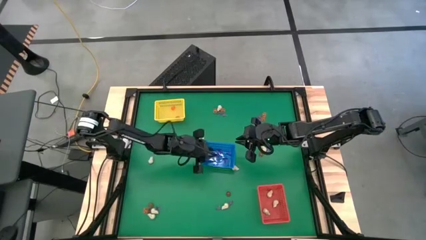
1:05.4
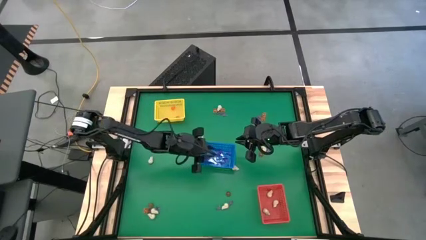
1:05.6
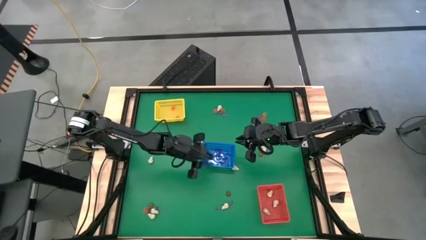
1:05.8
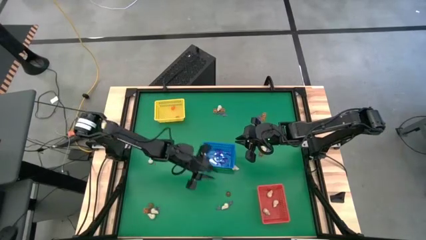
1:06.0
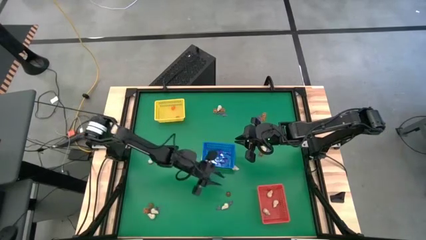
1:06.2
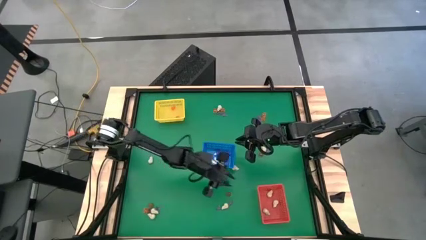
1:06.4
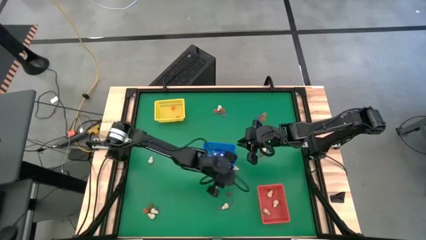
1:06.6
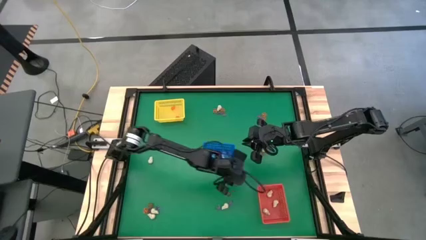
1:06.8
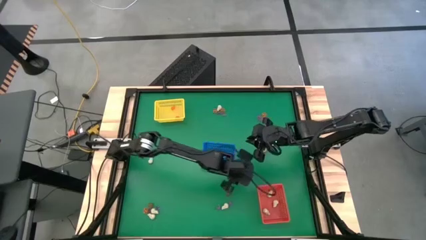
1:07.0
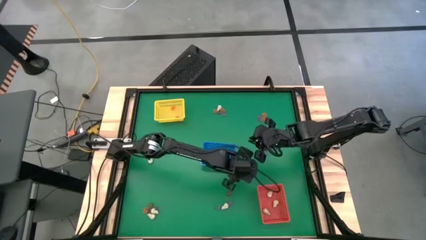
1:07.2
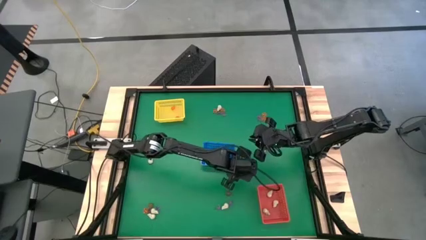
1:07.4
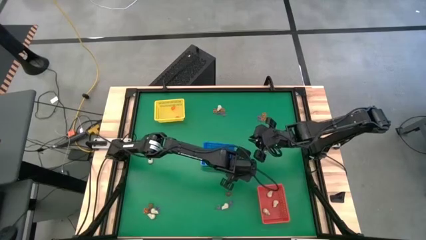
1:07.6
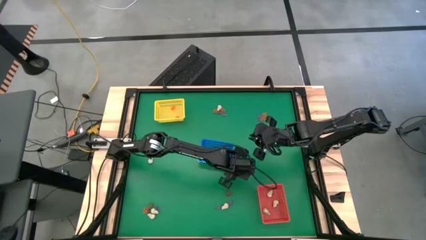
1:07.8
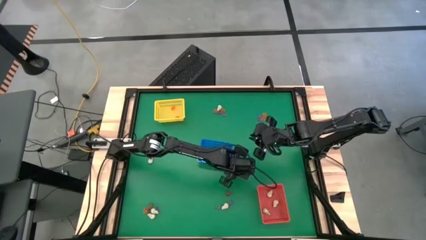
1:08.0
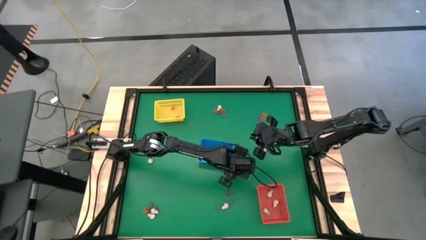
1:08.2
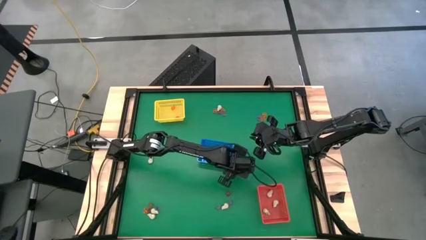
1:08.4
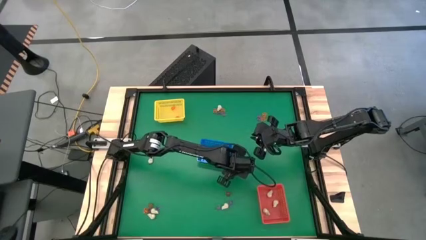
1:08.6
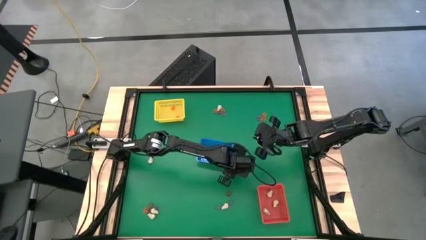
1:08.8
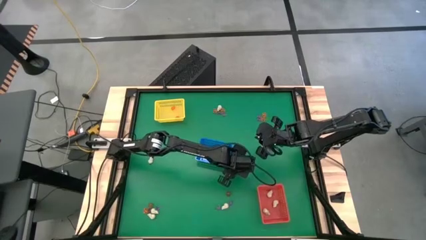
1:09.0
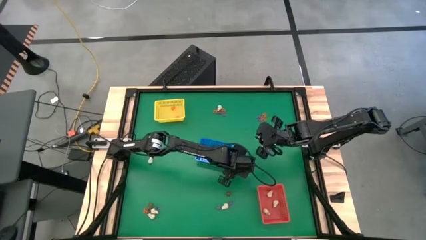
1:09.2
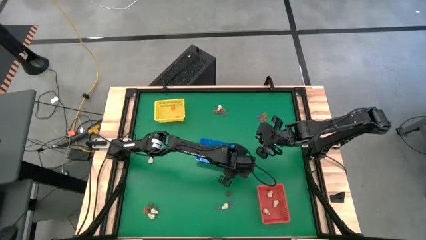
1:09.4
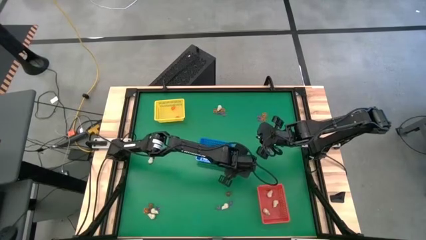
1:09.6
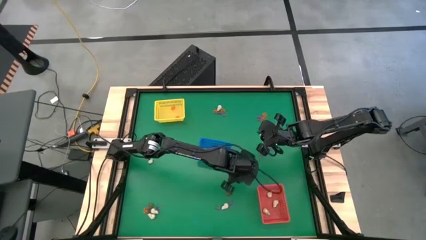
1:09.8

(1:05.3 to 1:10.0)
Task: Sort Halloween decoration
Put the skull toy into the red bin

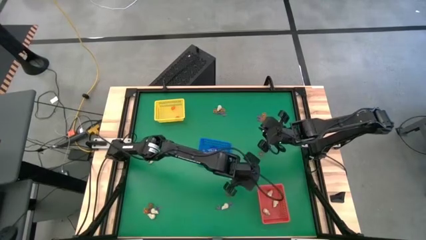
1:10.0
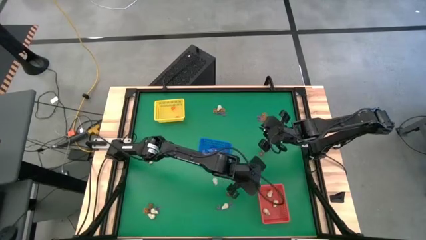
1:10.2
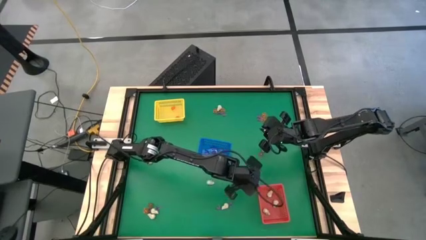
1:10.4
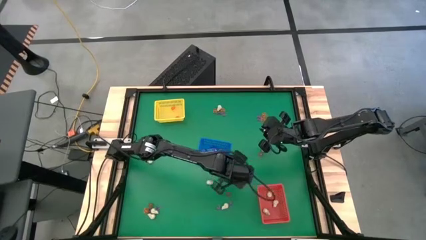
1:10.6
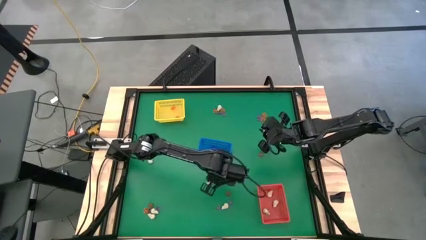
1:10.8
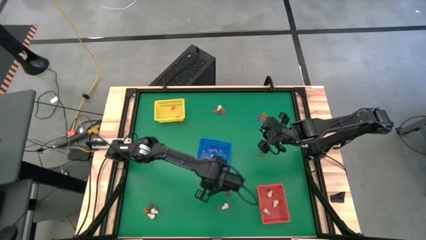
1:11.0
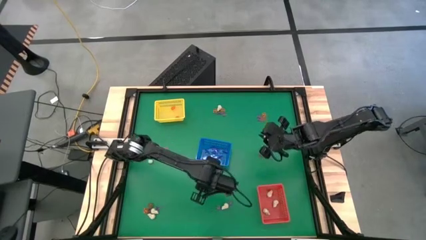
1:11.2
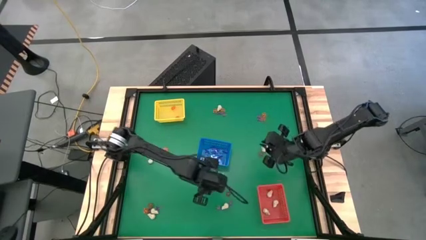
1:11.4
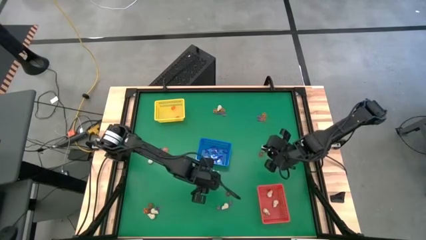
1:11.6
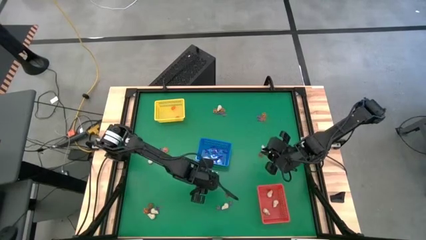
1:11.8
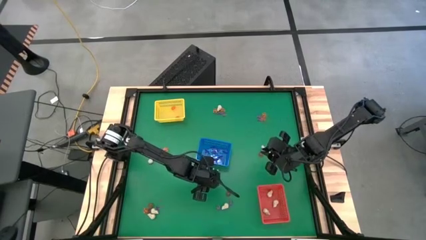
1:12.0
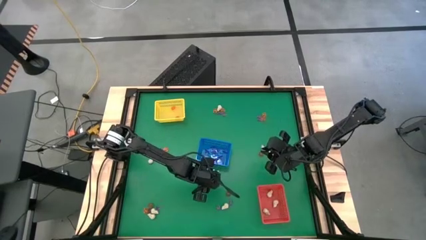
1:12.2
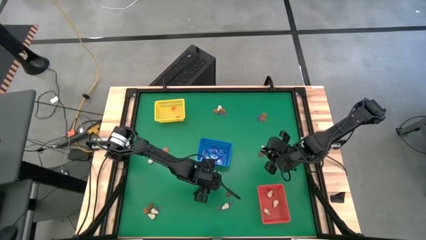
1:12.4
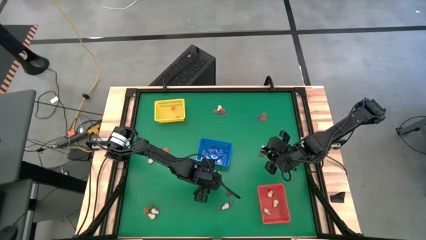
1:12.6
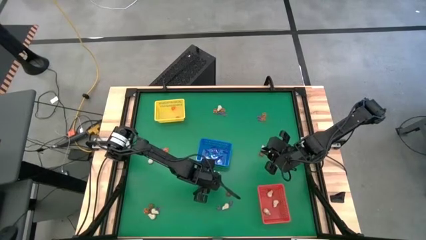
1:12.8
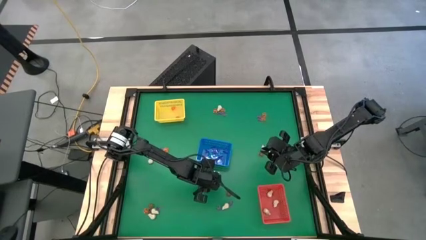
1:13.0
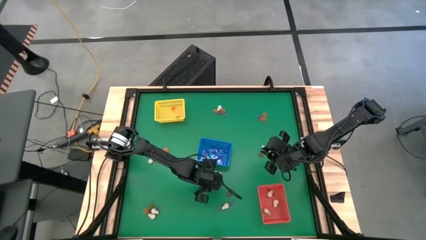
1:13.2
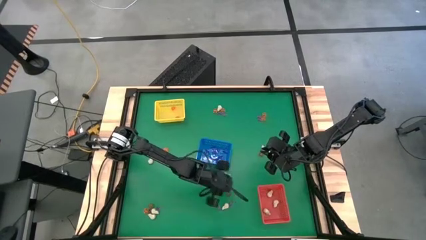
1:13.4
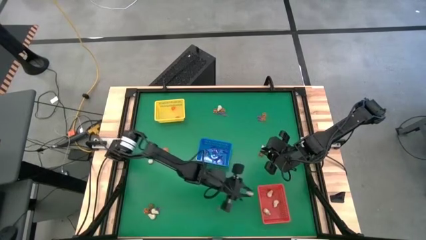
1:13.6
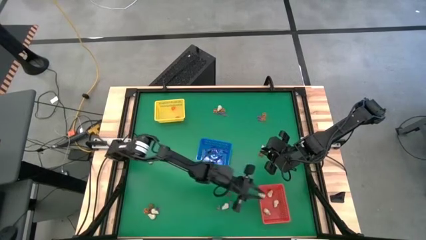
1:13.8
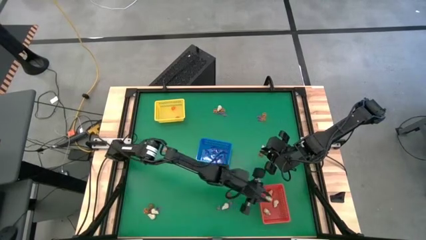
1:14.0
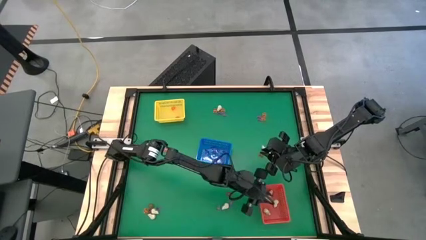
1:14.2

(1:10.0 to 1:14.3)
Put the skull toy into the red bin

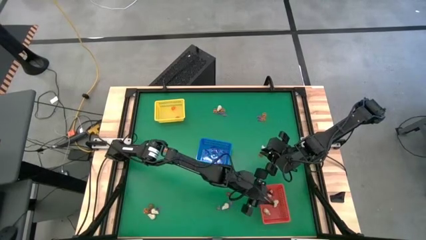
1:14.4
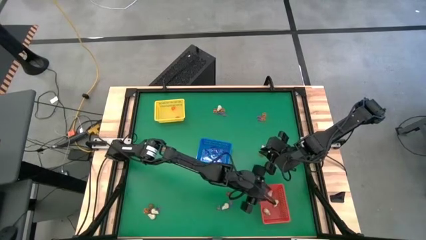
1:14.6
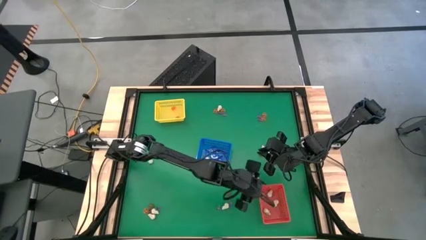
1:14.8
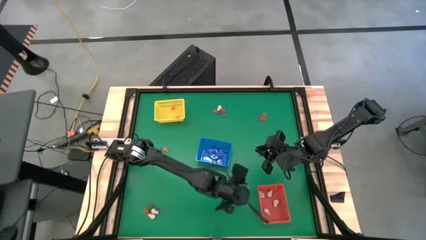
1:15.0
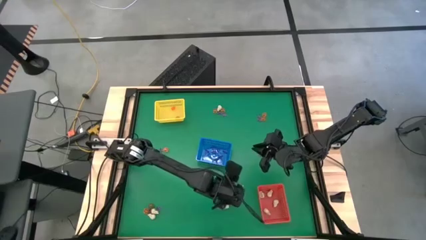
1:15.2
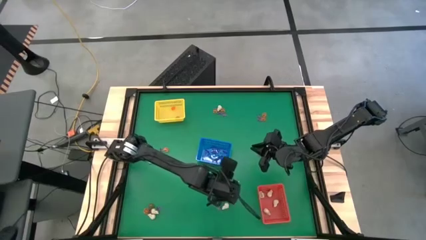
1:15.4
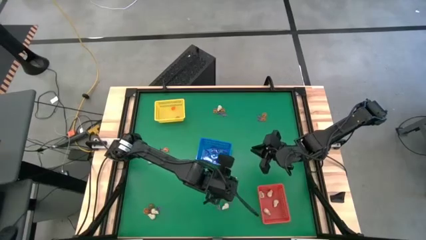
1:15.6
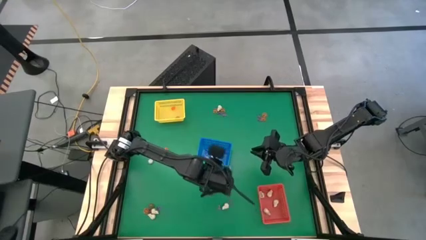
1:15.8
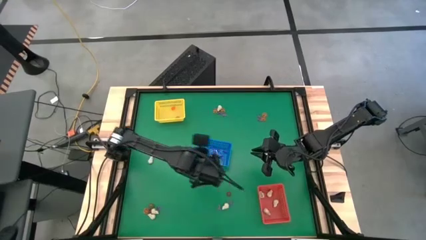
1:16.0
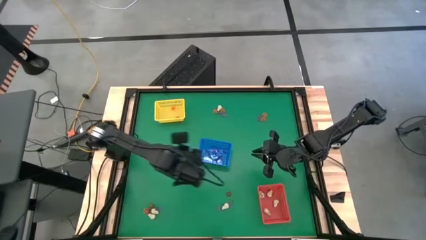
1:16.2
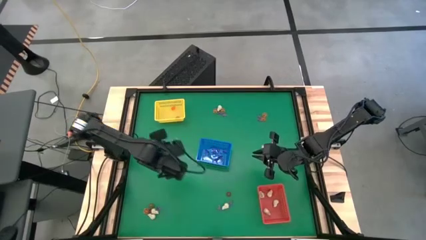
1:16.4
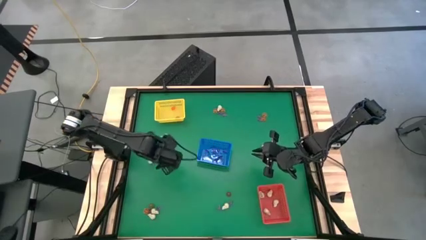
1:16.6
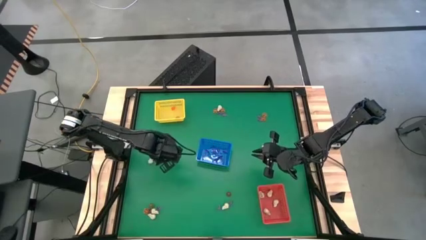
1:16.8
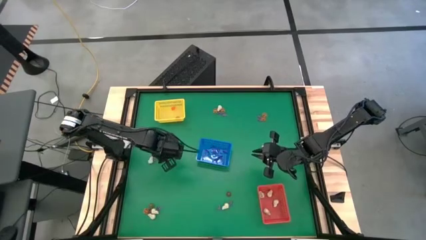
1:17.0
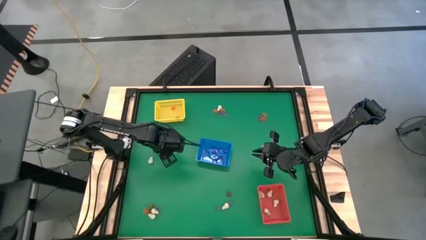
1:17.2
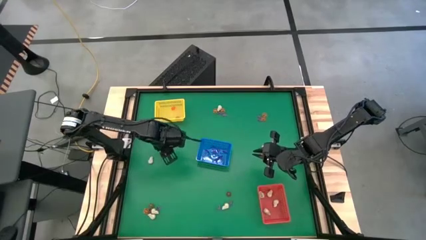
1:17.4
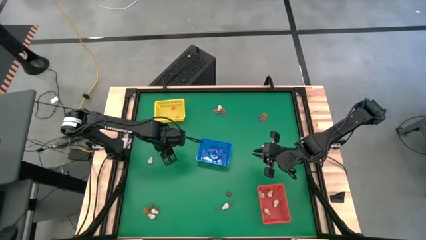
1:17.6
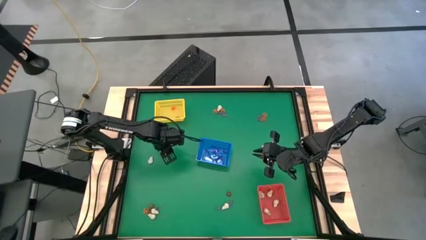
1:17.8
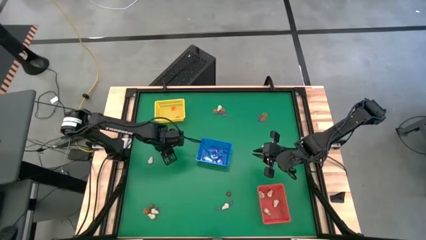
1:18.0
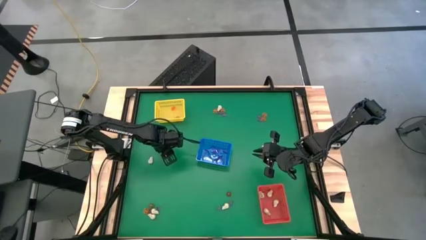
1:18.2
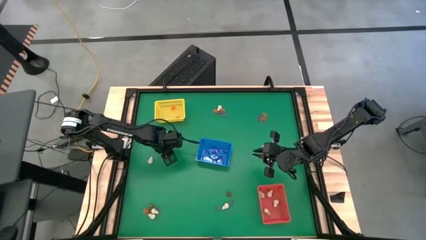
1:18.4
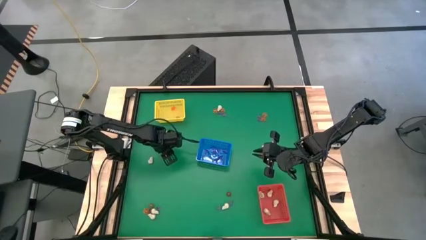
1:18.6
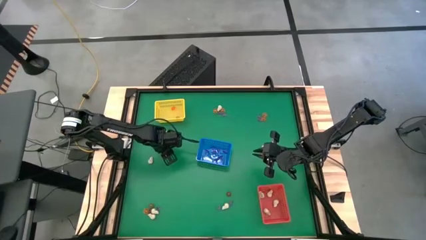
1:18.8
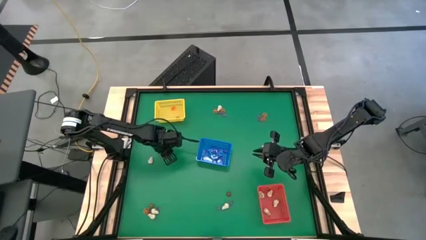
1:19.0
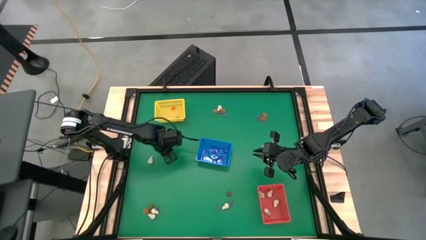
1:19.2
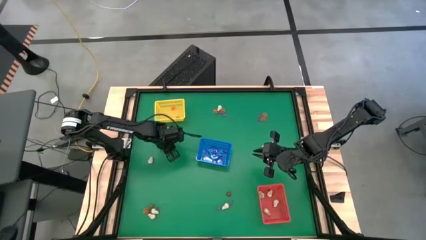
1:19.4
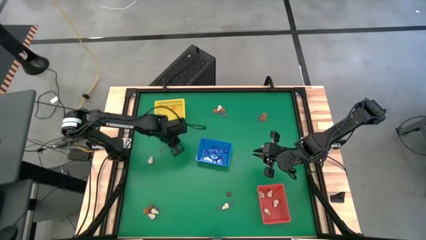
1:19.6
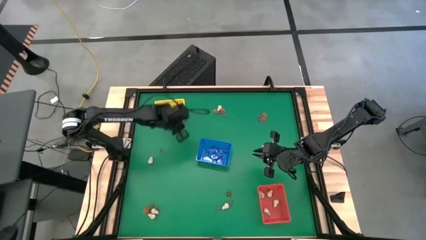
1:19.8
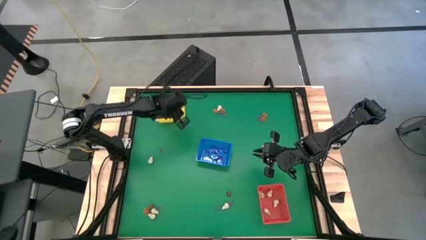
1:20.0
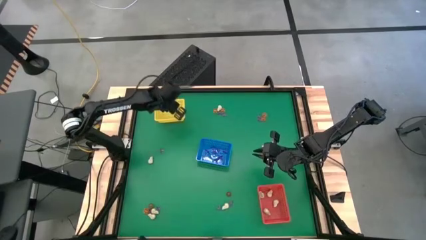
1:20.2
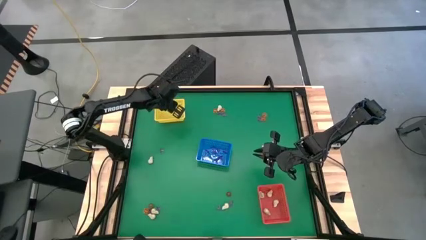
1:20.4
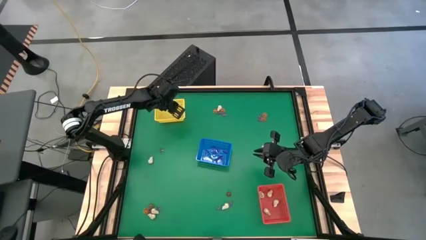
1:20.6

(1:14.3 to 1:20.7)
Put the pumpkin toy into the yellow bin

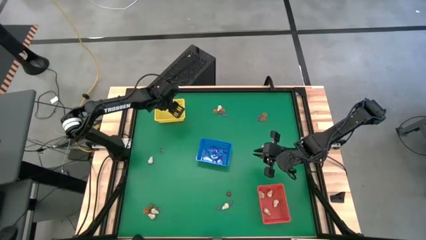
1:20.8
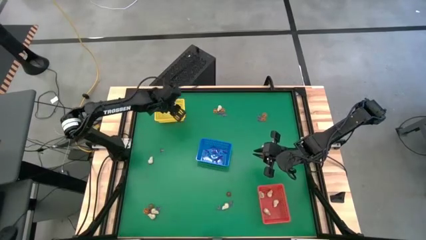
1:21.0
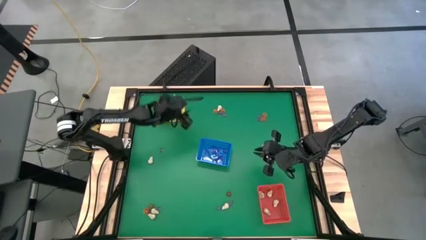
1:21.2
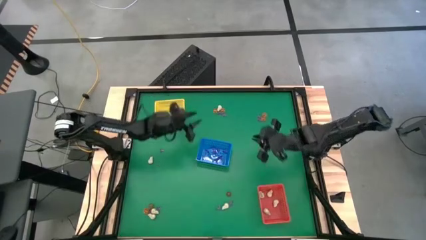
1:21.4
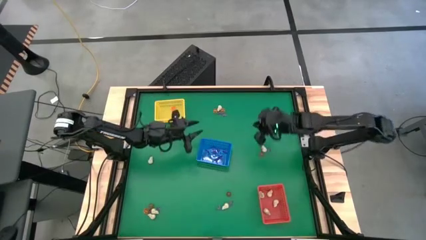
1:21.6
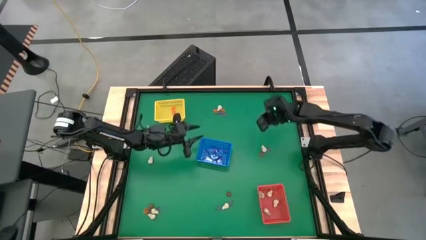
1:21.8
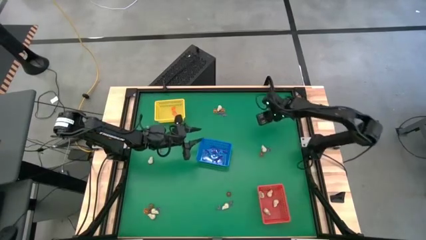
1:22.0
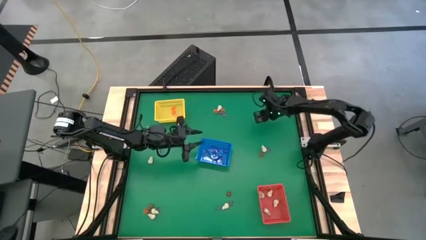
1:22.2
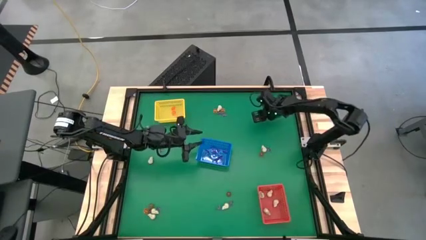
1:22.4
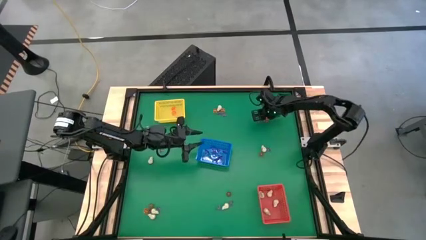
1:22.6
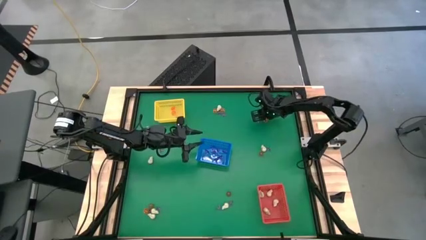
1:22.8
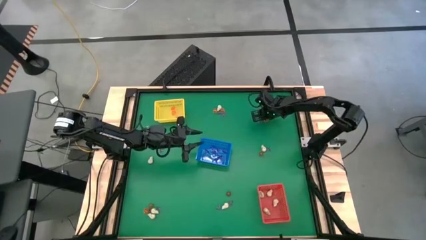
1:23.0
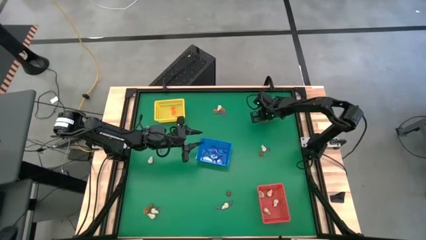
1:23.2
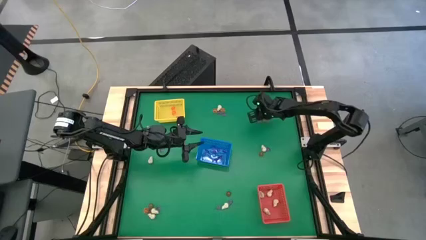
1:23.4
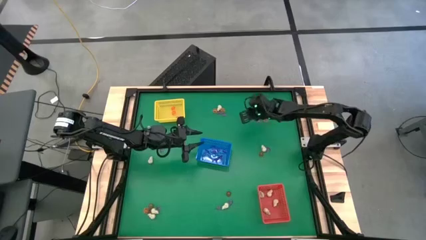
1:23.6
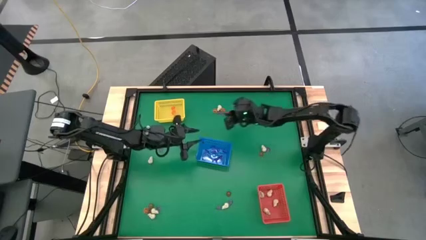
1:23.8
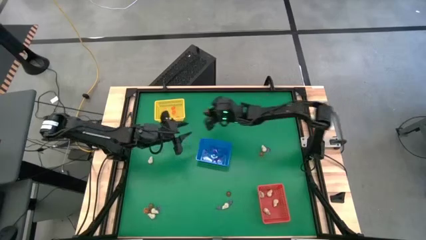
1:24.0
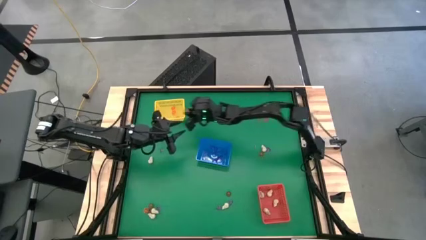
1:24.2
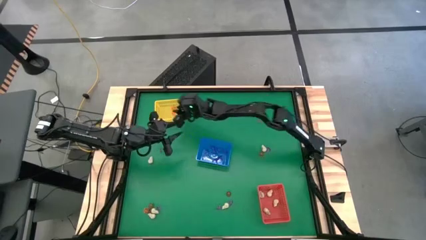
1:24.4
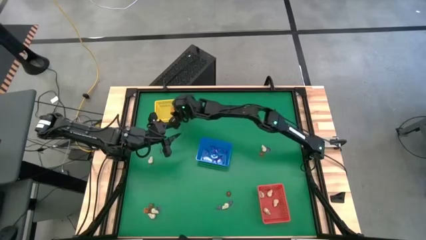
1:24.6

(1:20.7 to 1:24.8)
Put the pumpkin toy into the yellow bin
